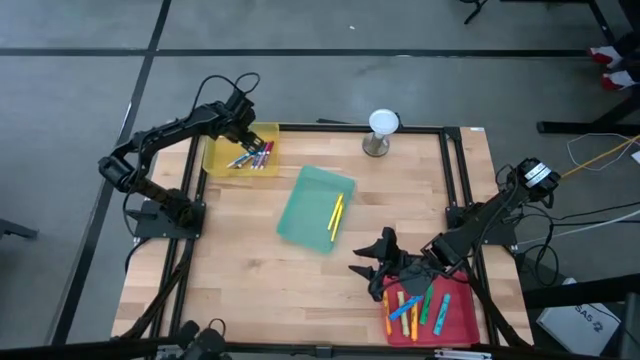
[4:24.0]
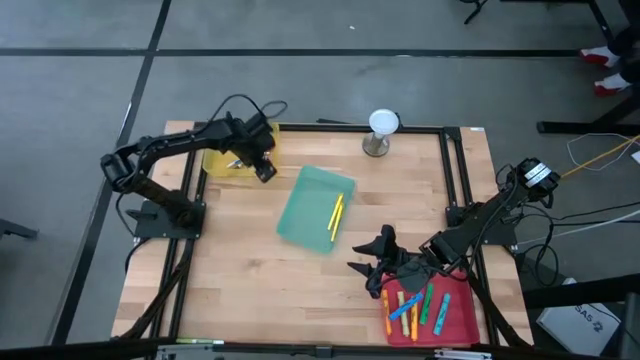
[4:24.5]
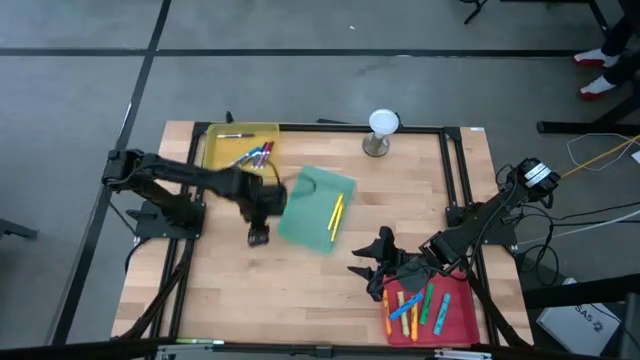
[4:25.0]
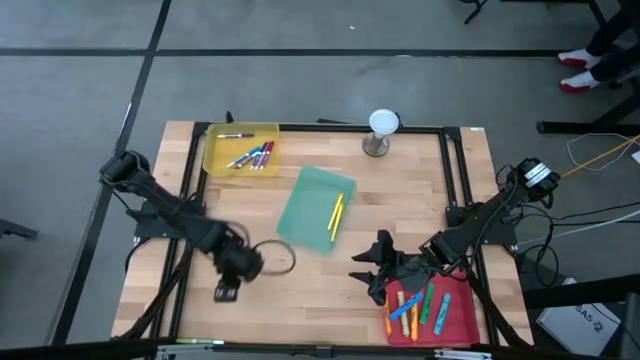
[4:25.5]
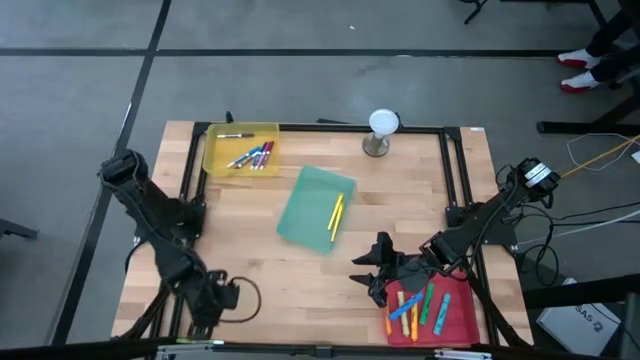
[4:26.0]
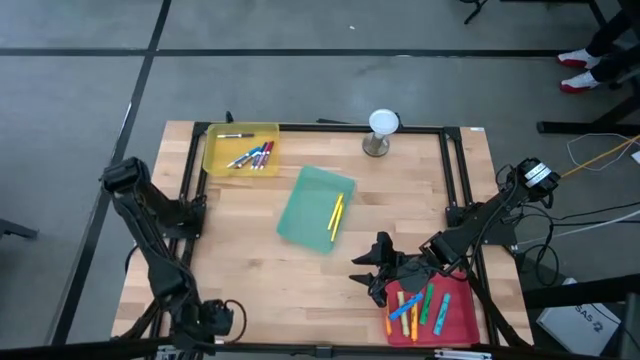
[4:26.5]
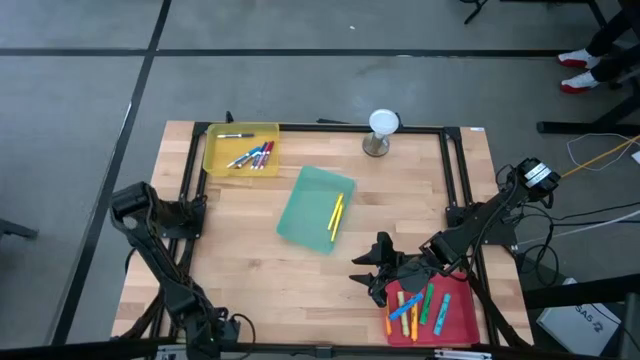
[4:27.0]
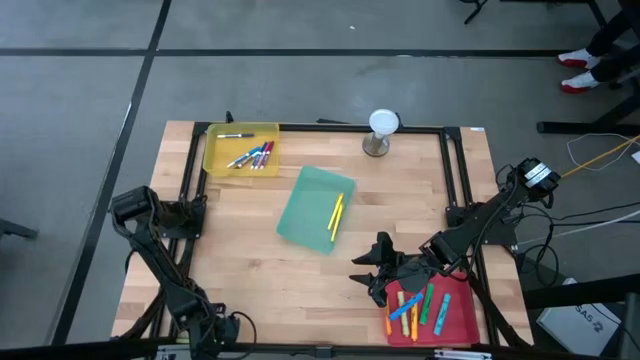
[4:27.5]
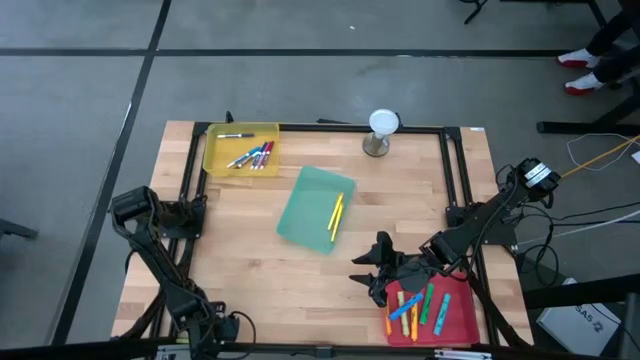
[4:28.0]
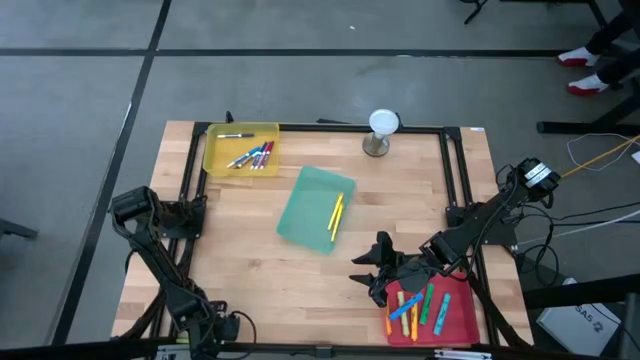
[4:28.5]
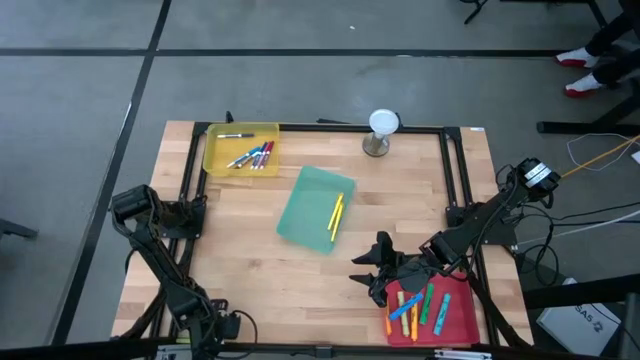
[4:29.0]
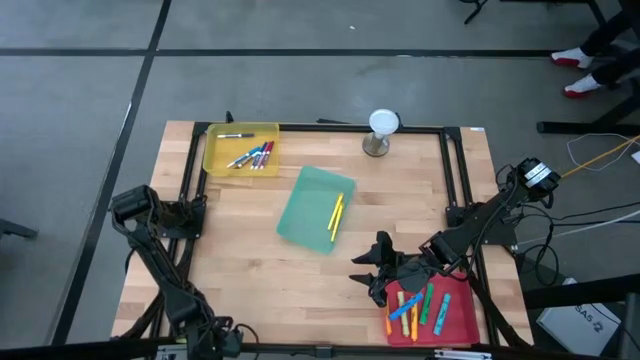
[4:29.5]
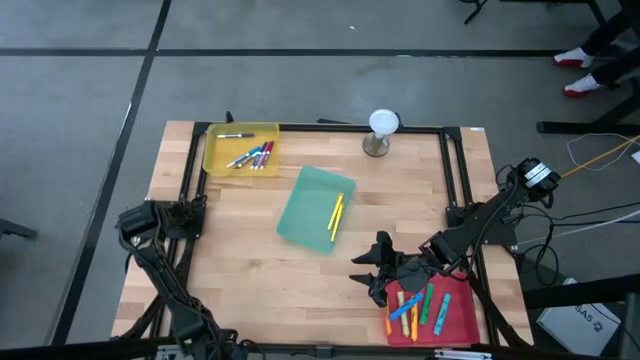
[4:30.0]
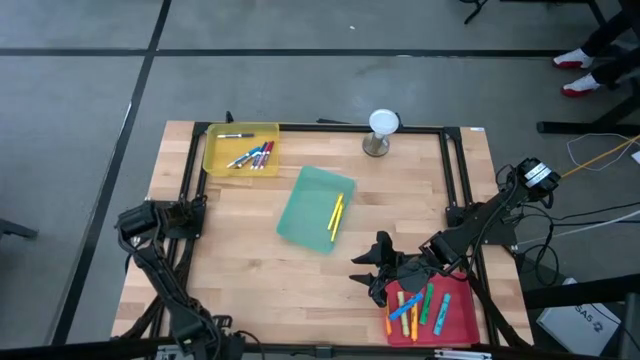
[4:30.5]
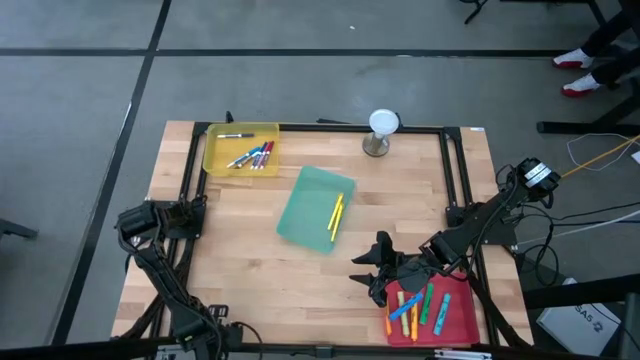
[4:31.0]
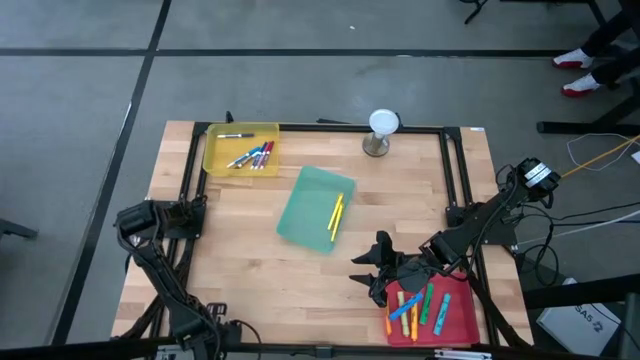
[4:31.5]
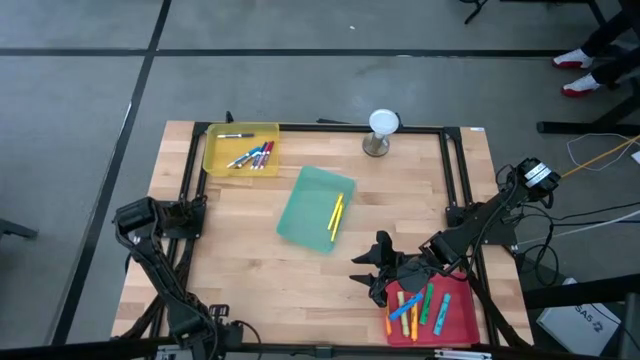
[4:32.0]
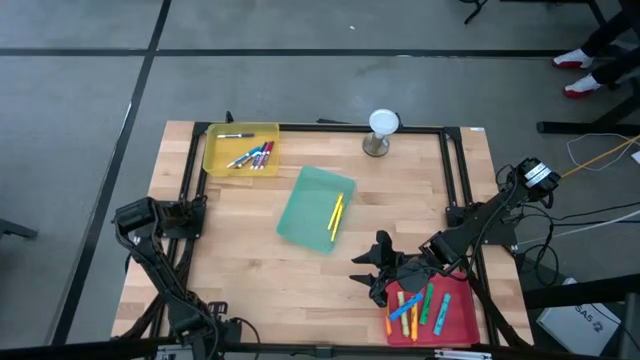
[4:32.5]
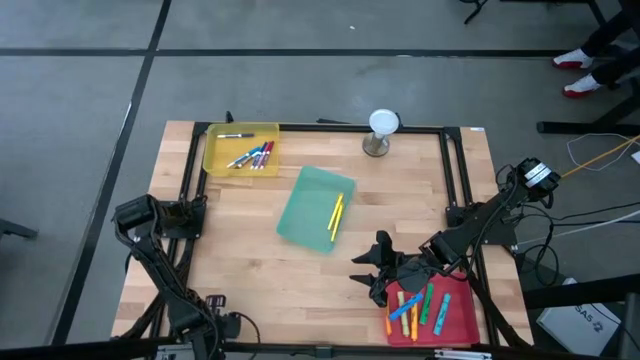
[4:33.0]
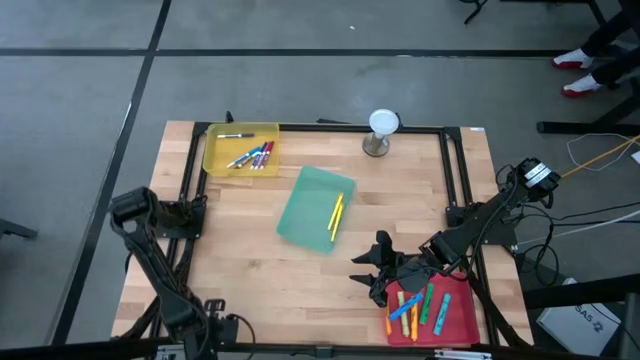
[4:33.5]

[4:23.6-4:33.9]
Task: Pick & Place Markers
Put the green marker pen into the yellow bin

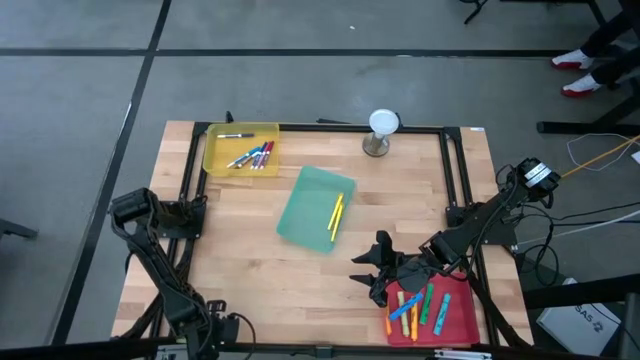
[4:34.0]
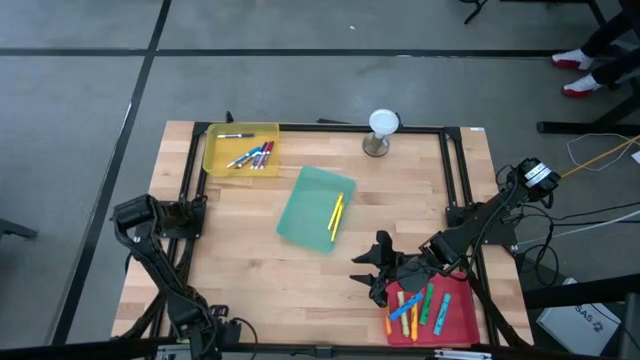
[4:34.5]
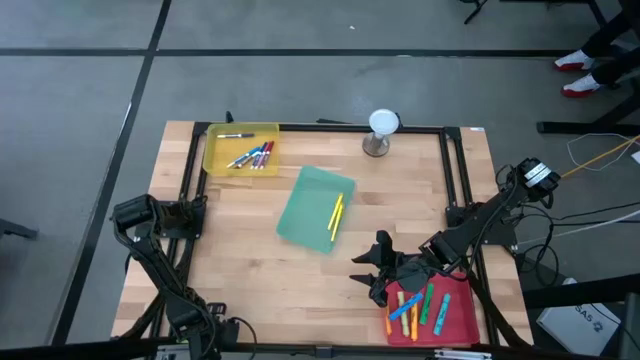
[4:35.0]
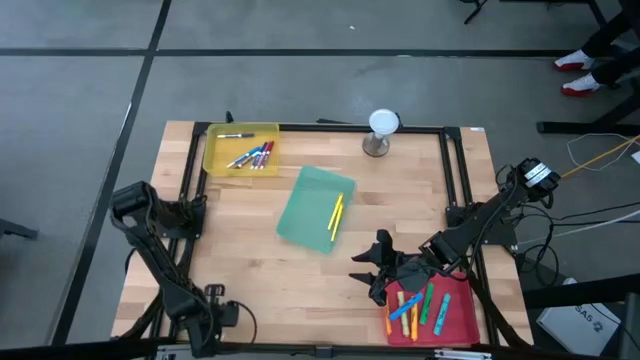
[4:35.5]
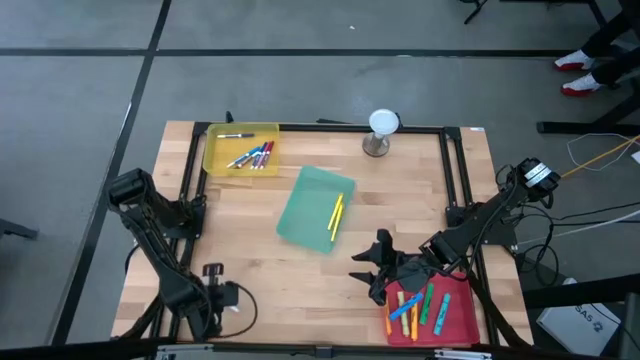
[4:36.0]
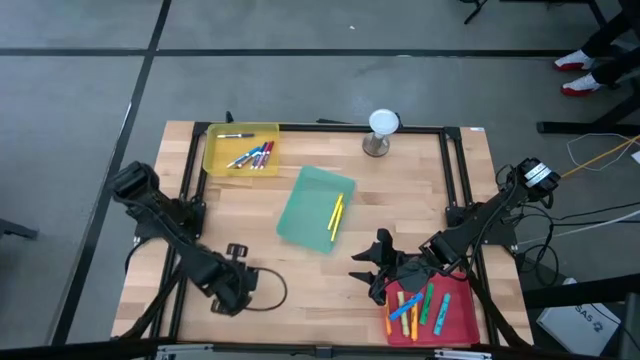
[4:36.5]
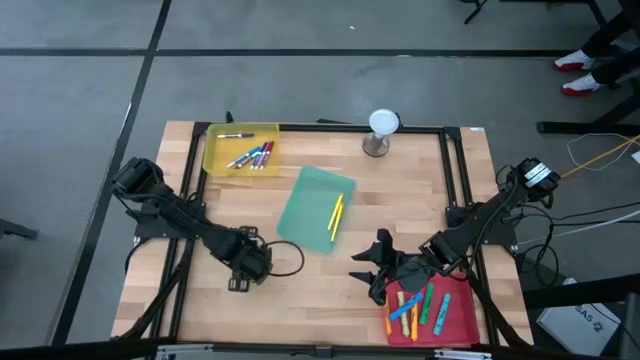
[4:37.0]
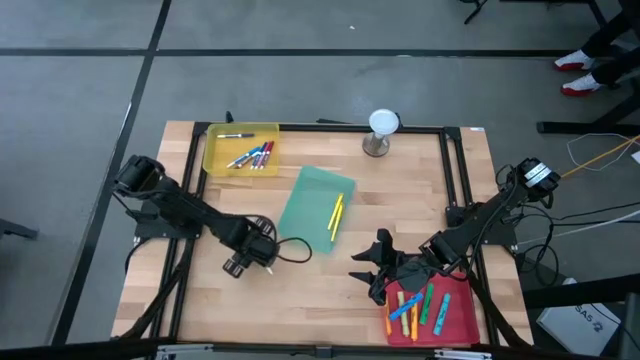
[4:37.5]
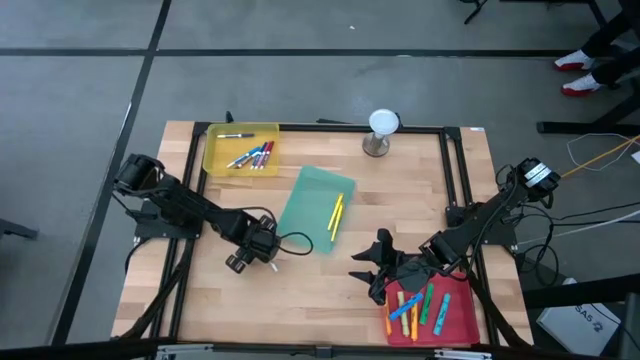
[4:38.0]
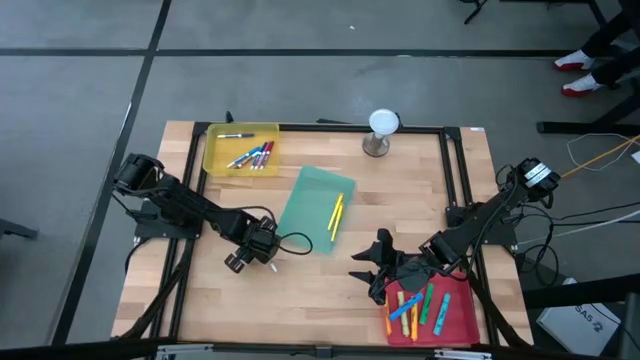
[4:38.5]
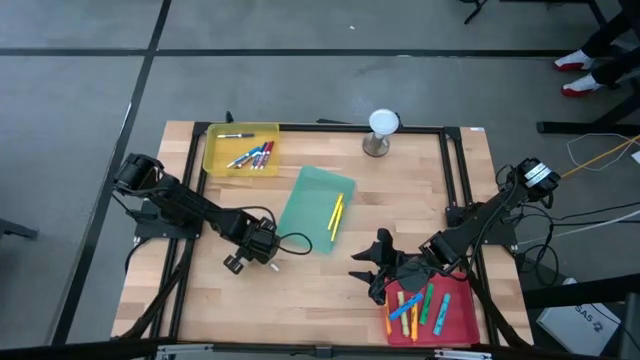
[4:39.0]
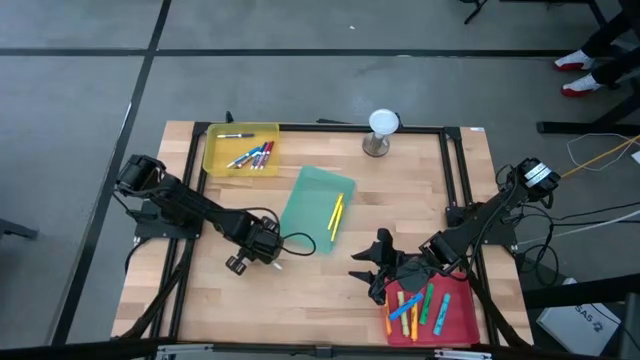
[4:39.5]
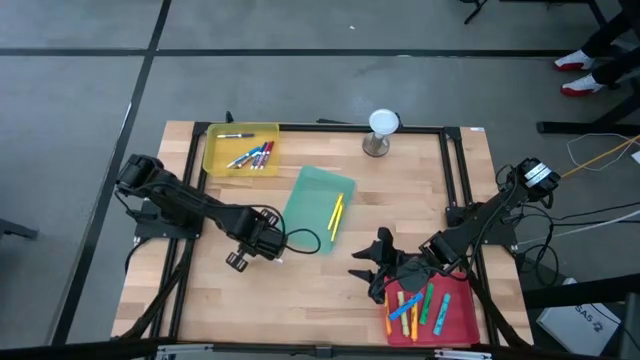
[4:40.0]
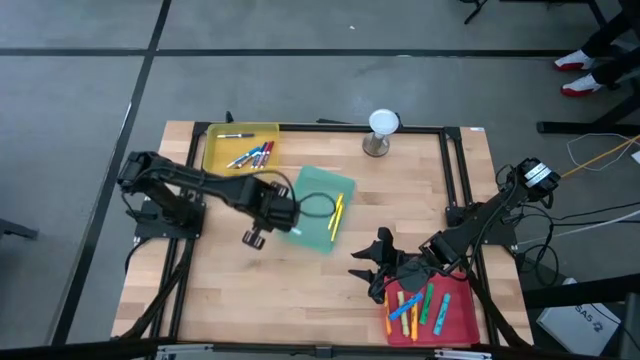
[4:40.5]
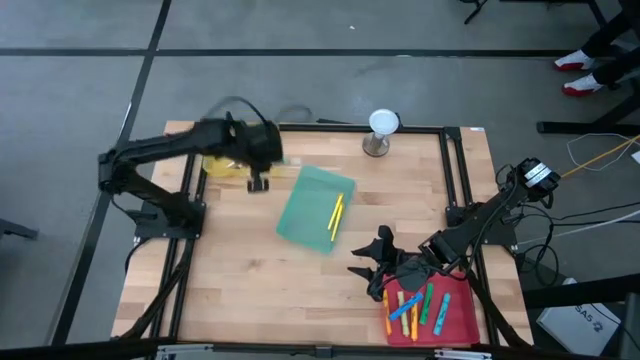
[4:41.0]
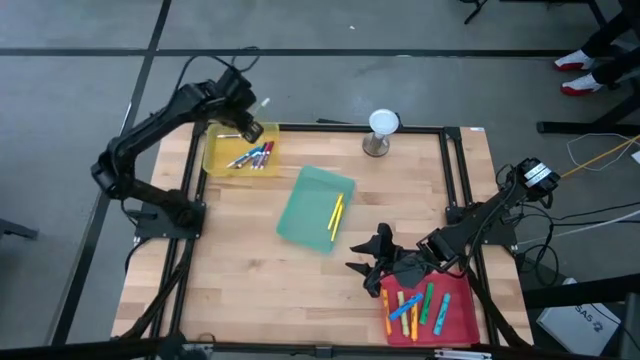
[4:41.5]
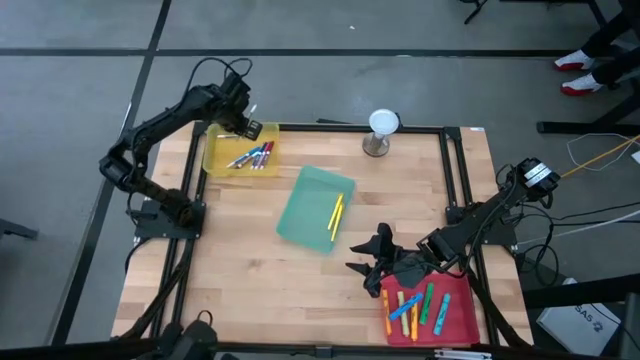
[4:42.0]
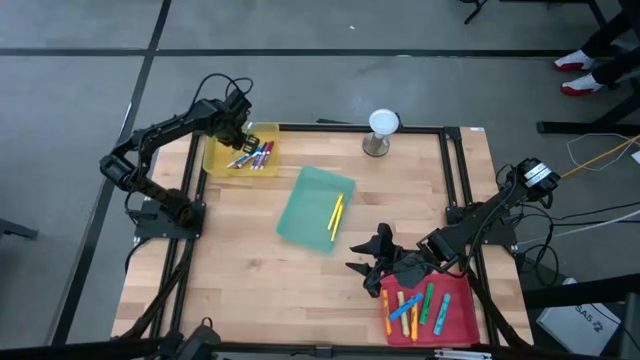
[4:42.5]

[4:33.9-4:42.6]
Put the green marker pen into the yellow bin

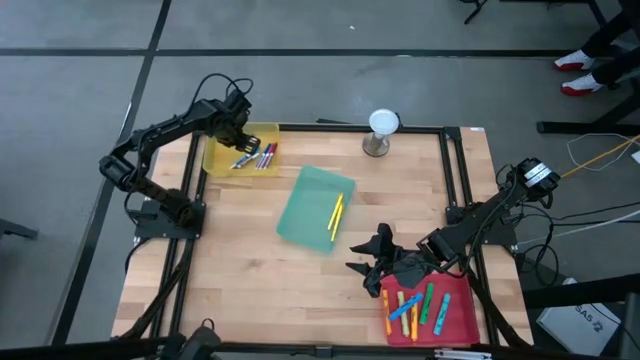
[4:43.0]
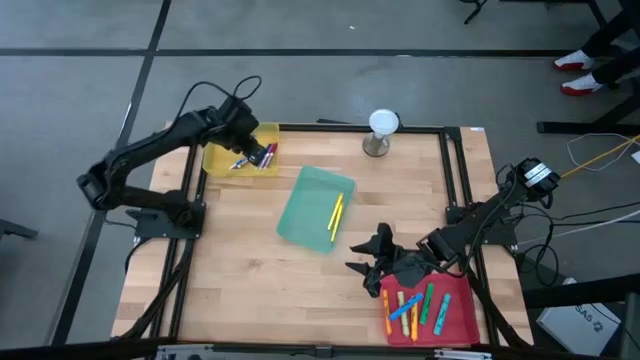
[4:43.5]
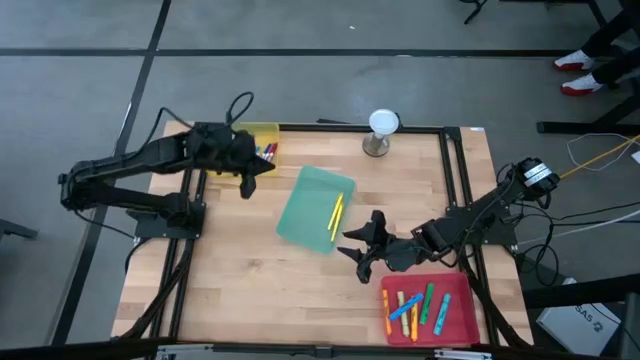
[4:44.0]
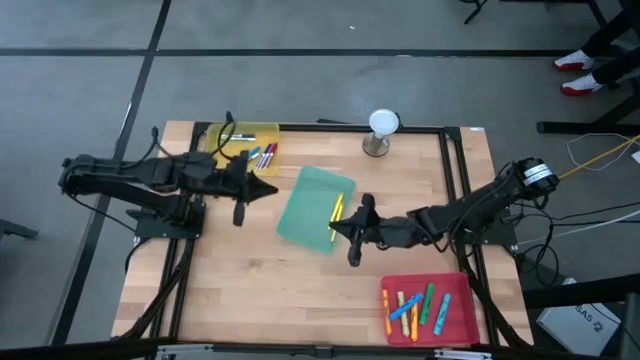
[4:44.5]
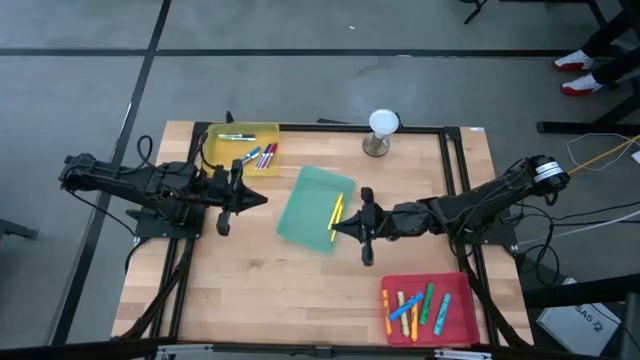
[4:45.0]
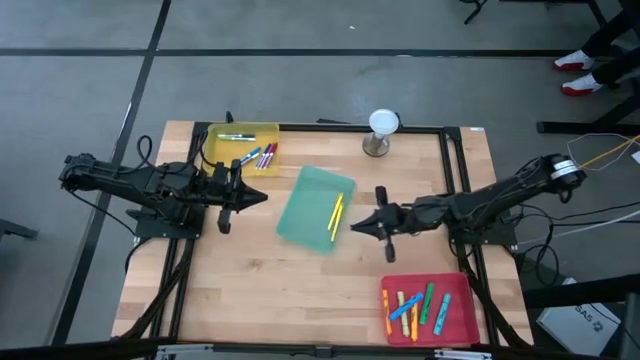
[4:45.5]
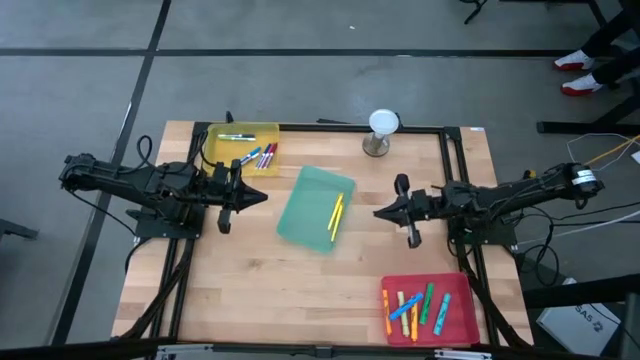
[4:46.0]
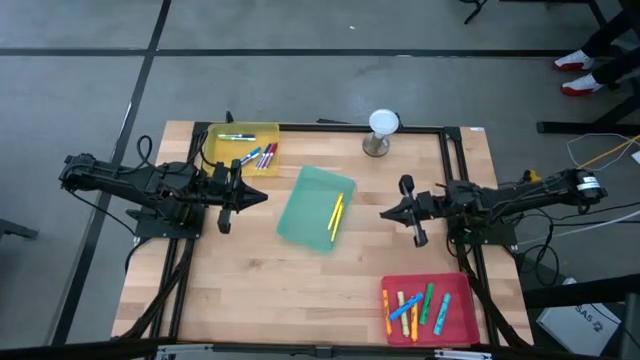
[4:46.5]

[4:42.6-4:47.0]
Return to Home Position
